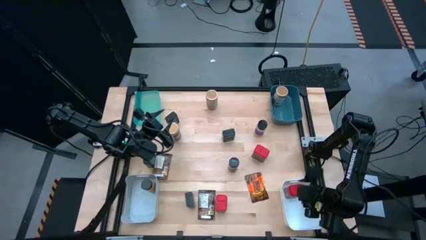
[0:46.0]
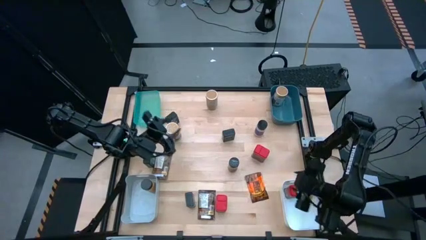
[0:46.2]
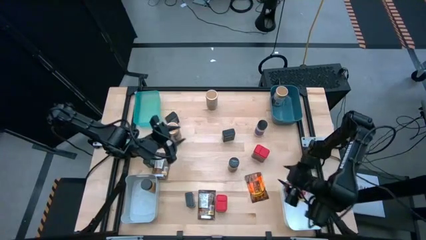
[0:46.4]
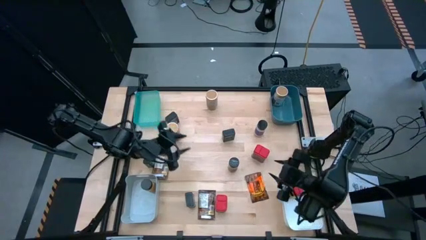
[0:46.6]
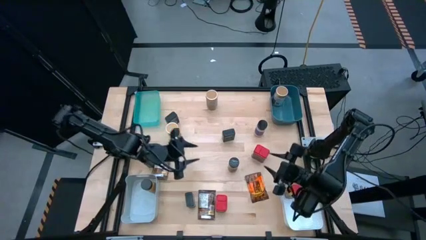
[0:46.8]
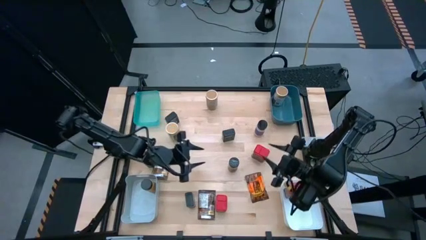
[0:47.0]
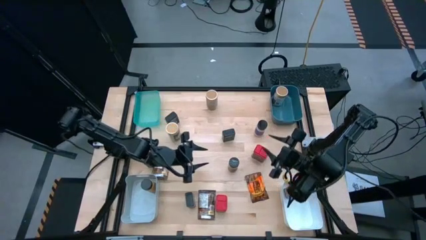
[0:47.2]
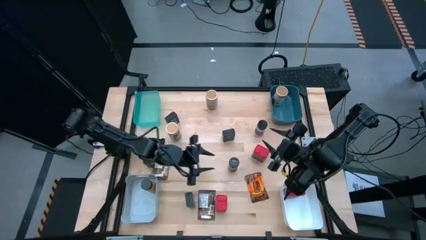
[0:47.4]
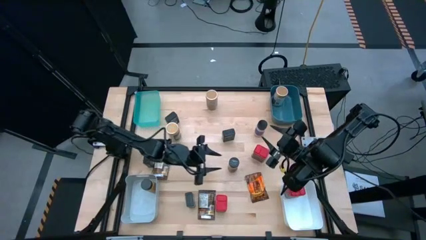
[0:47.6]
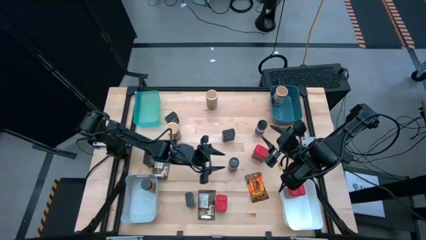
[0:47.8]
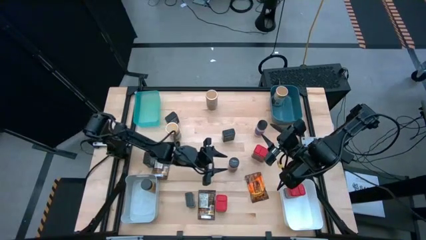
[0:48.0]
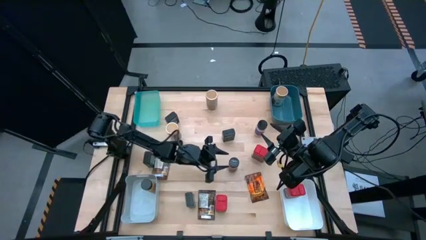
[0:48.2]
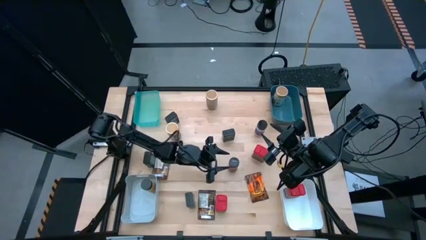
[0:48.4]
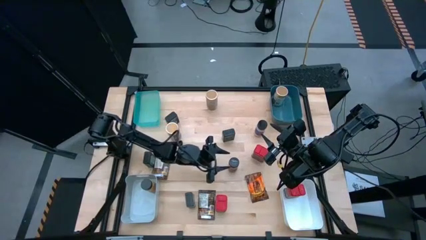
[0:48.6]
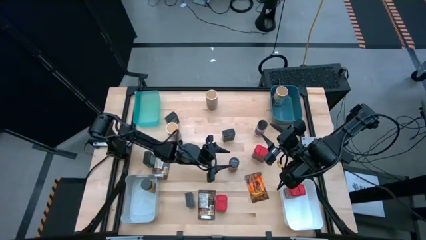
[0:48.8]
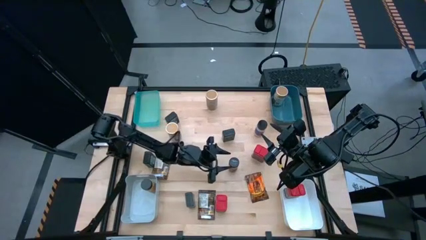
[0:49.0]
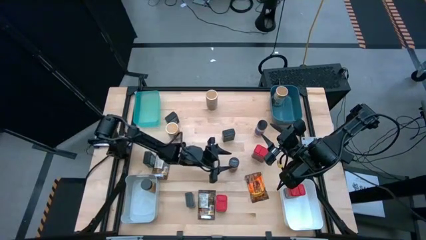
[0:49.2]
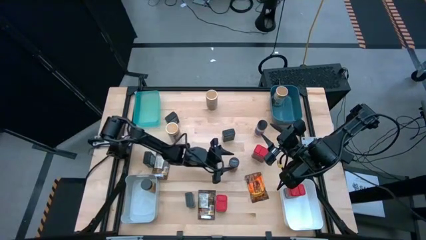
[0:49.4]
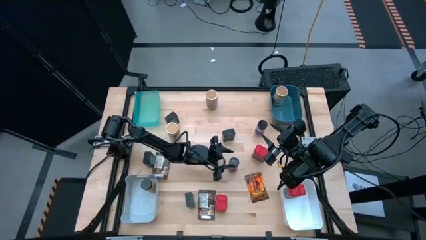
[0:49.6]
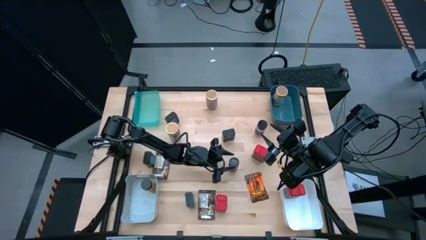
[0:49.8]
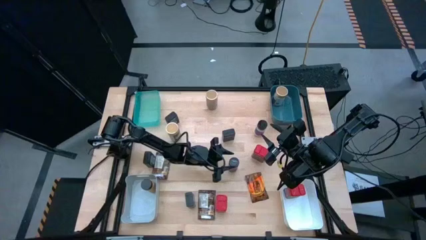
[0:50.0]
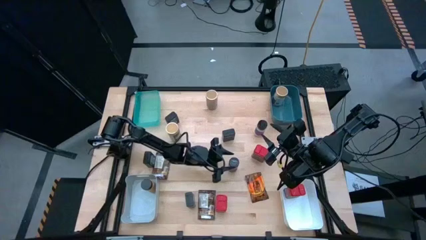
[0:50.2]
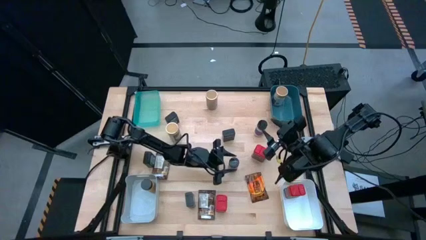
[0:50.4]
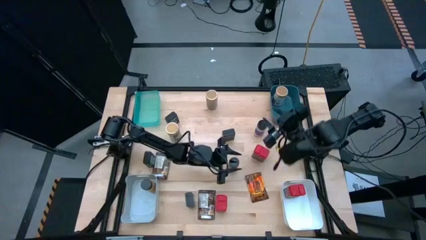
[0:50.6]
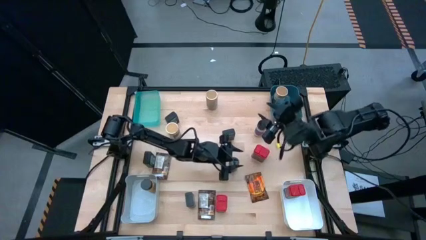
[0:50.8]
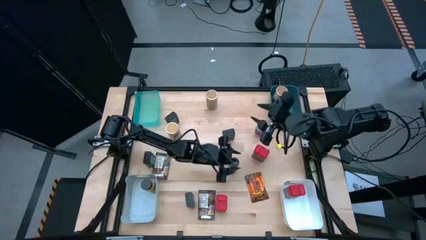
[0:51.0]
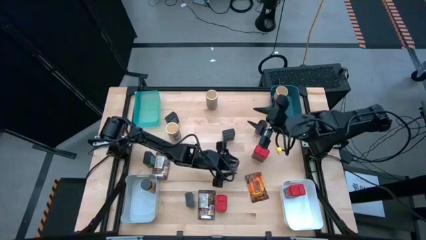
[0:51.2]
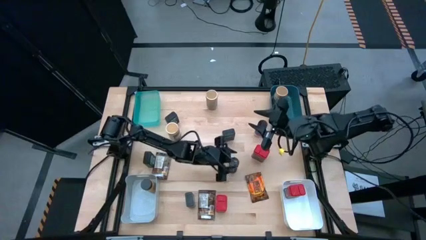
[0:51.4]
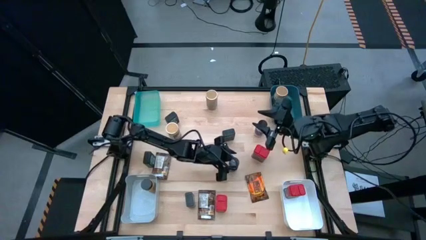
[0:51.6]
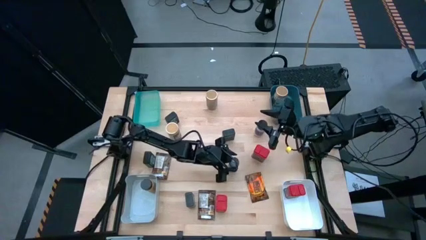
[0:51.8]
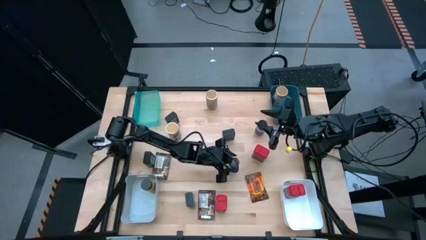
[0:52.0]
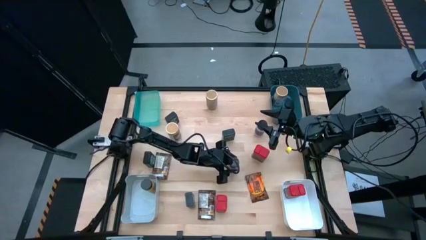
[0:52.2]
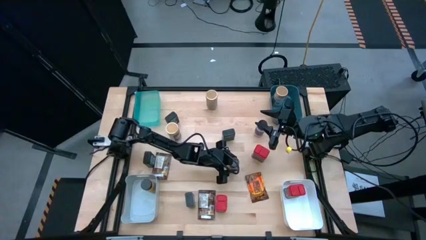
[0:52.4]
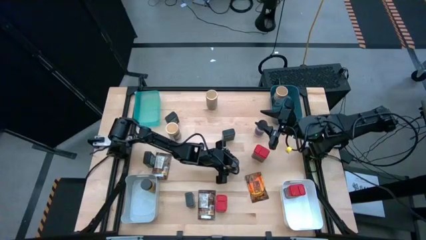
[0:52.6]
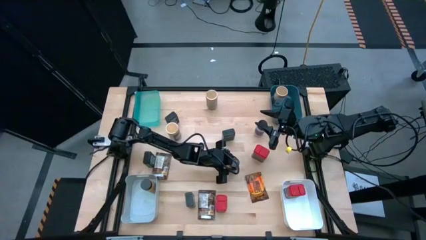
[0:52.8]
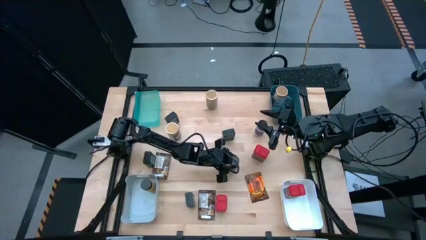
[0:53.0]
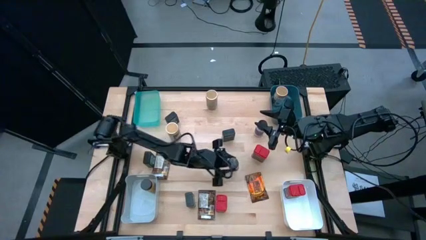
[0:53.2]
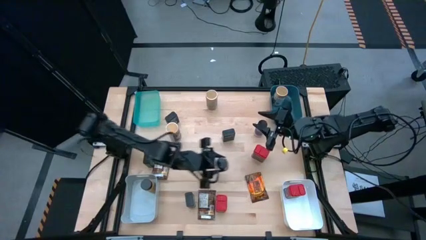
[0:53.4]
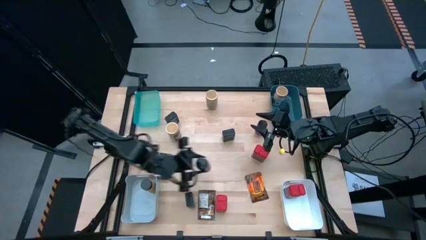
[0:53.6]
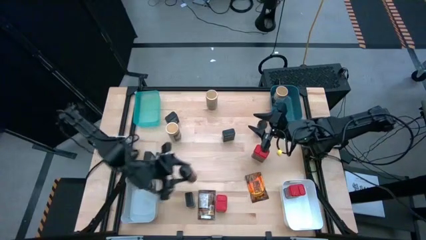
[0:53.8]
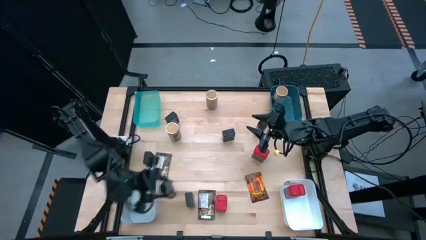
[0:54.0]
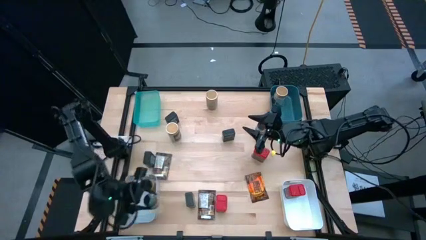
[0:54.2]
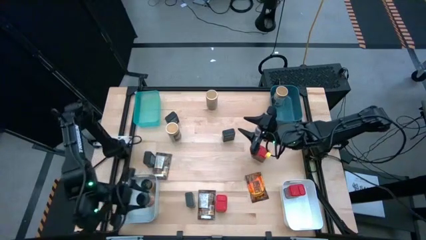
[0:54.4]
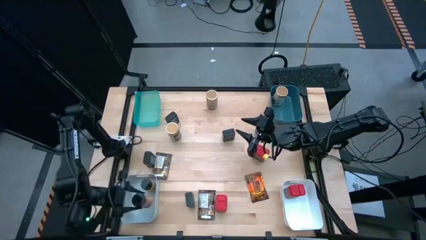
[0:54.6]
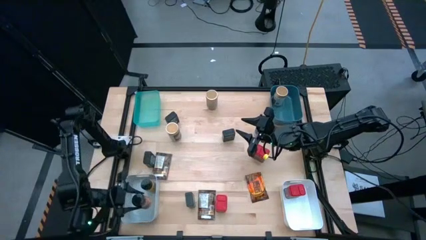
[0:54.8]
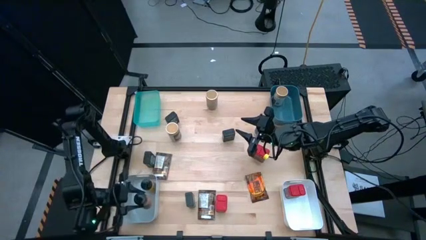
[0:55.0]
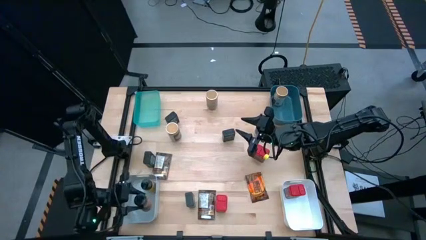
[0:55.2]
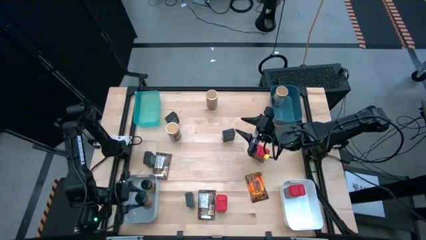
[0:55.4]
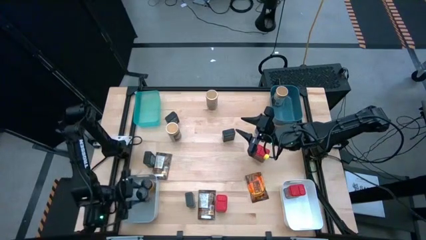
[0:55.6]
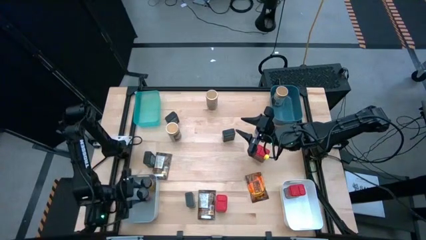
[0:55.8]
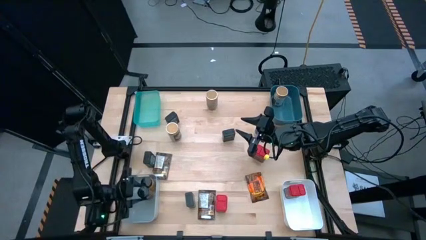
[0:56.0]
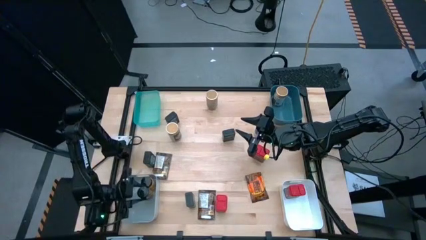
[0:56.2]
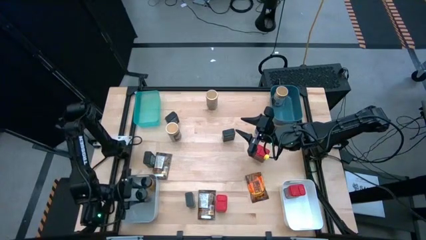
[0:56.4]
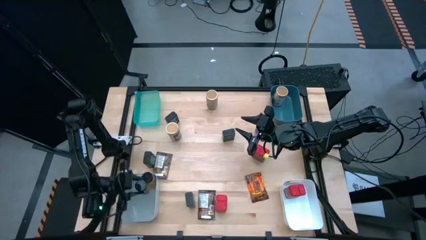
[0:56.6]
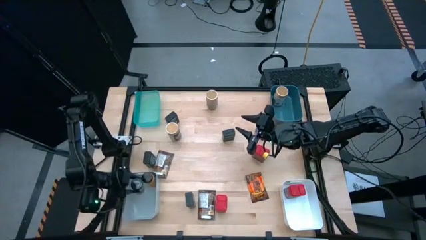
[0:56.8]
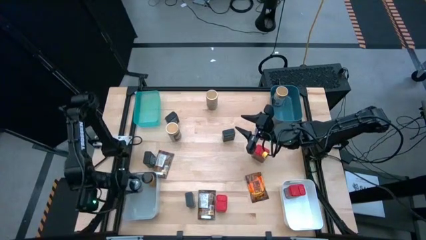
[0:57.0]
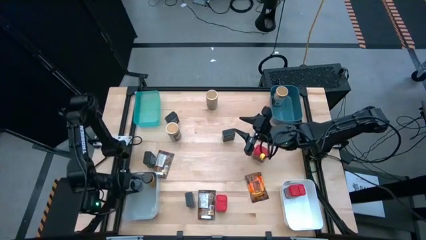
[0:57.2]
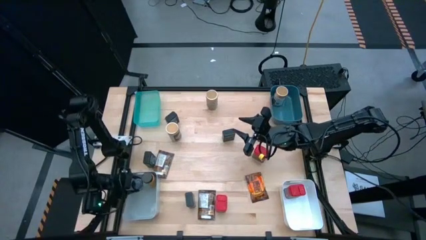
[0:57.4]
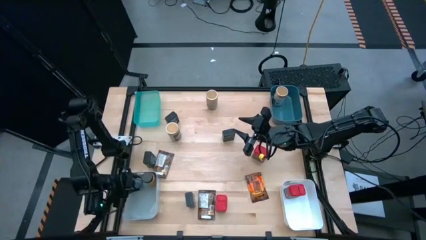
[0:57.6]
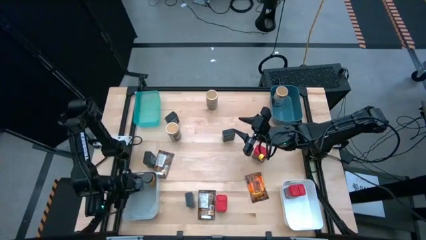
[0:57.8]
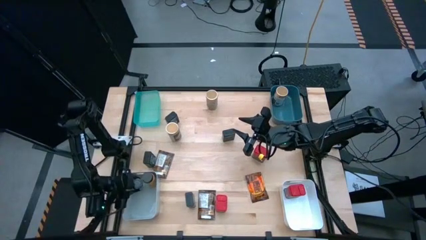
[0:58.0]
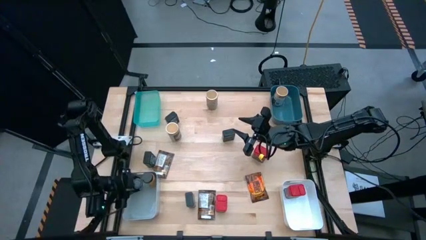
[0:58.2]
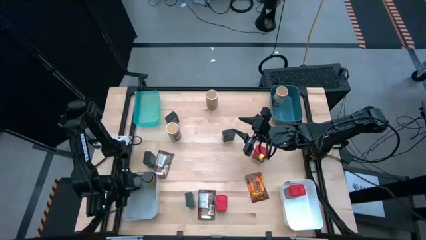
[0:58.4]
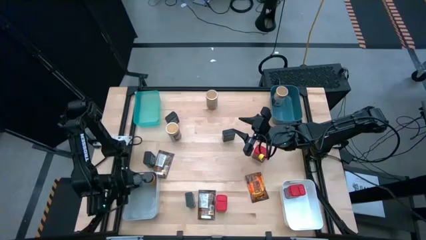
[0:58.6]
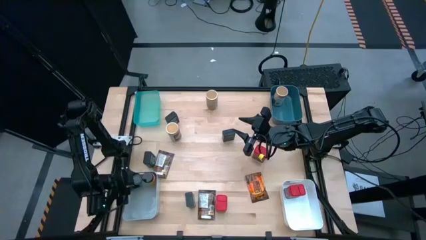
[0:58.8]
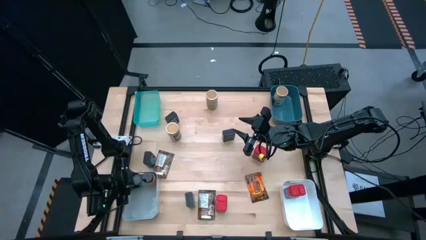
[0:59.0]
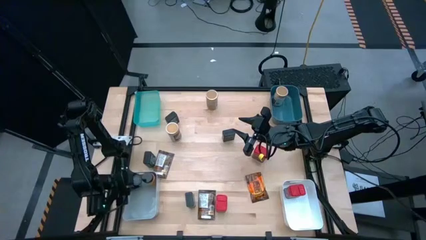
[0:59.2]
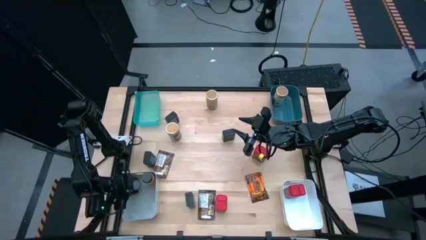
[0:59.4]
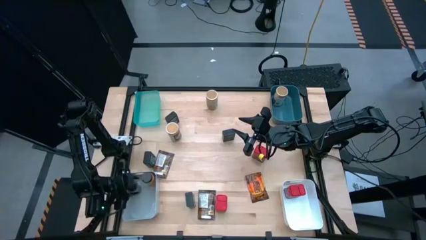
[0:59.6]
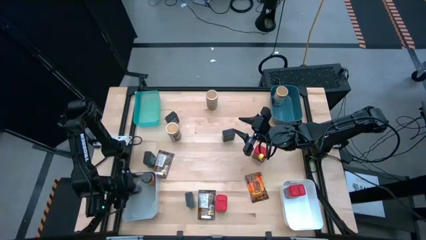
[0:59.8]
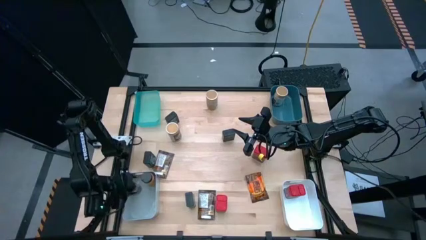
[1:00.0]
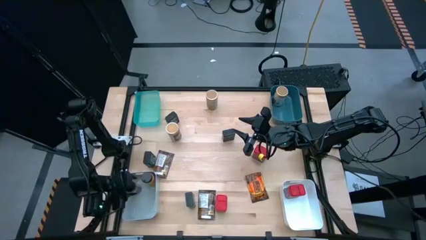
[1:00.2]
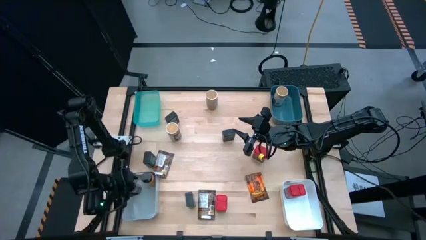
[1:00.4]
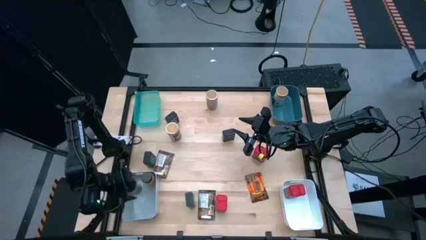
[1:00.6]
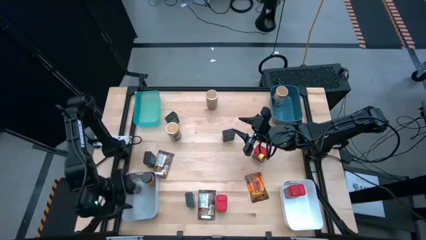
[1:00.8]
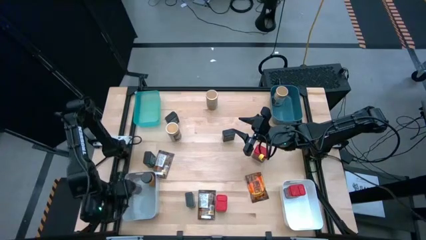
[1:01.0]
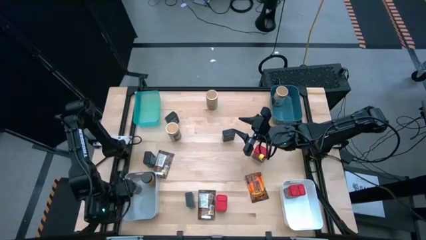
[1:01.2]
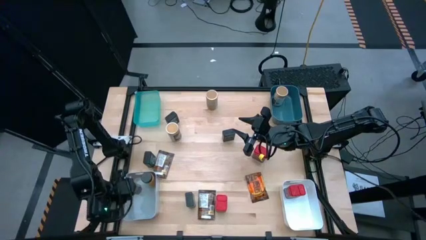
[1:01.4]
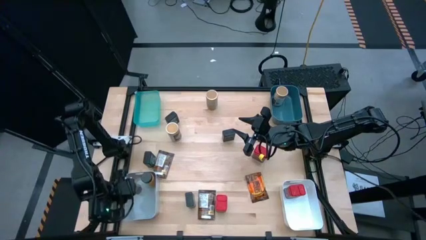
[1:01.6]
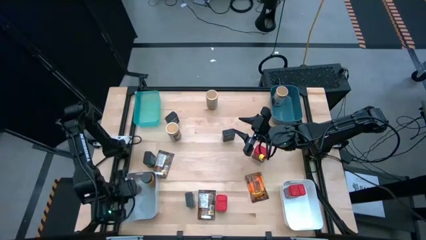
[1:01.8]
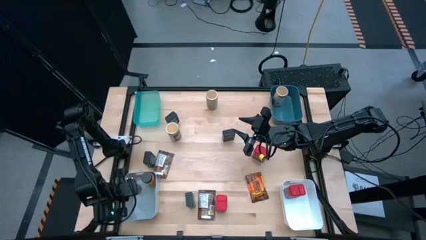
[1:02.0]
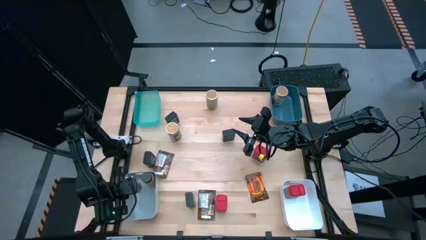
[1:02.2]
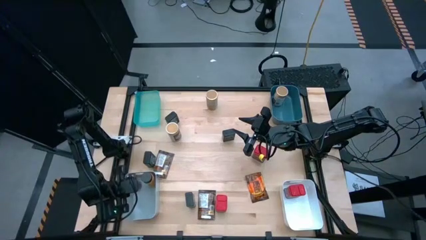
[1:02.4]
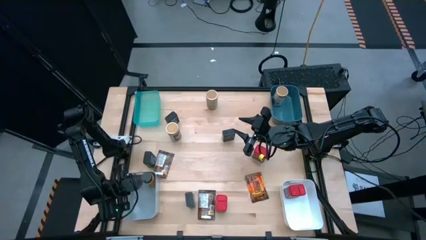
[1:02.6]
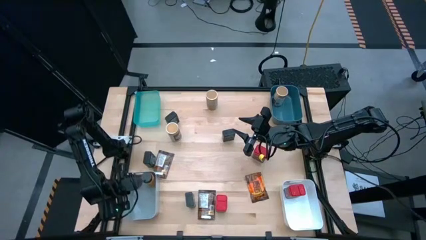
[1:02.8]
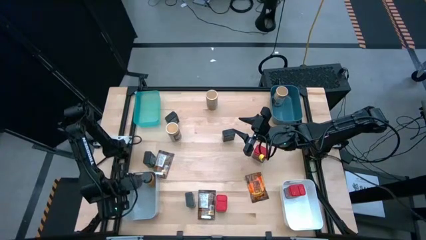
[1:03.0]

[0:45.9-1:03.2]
Task: Sort spices by type
Put the orange seasoning bottle into the gray bin
